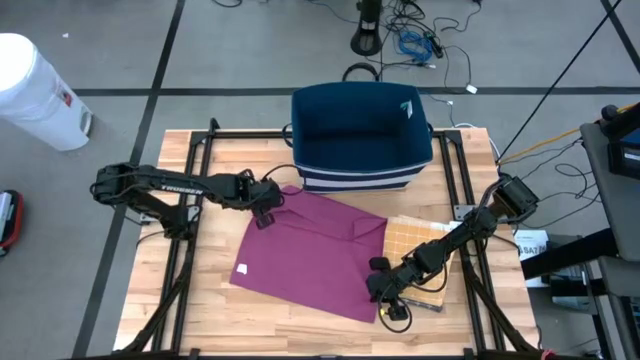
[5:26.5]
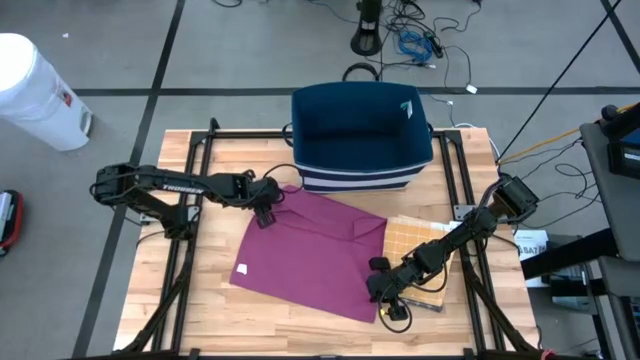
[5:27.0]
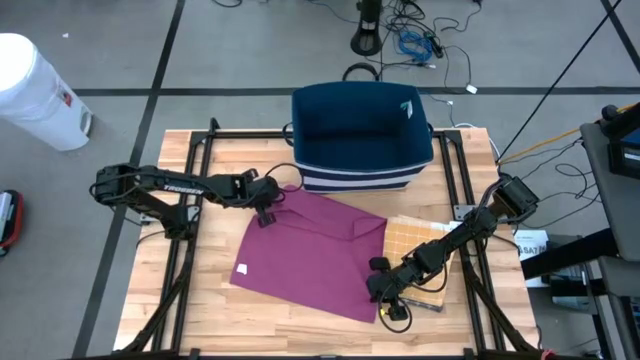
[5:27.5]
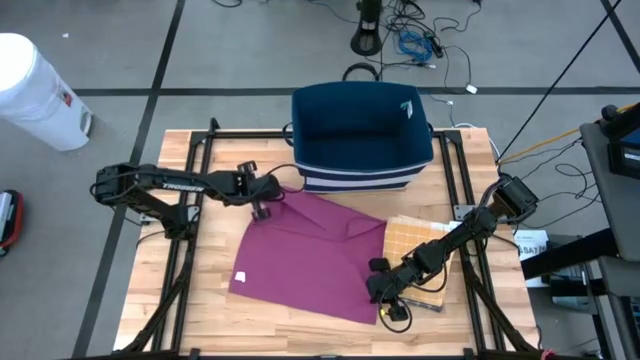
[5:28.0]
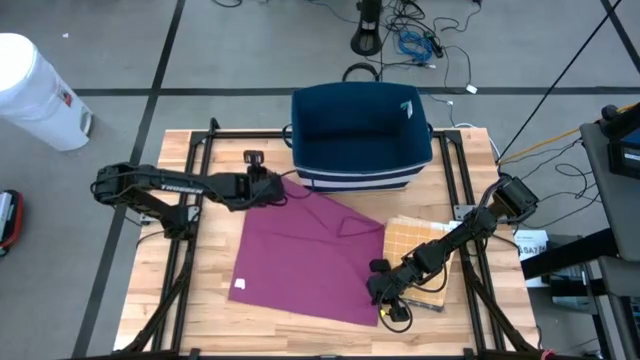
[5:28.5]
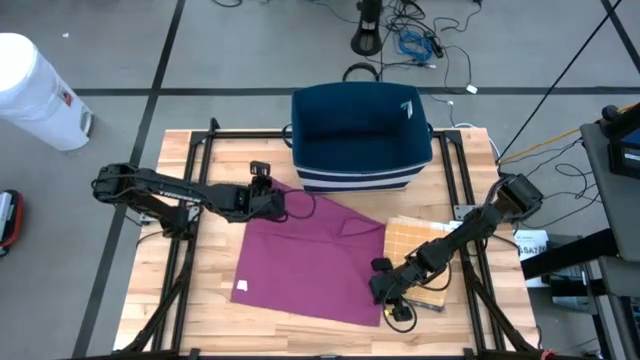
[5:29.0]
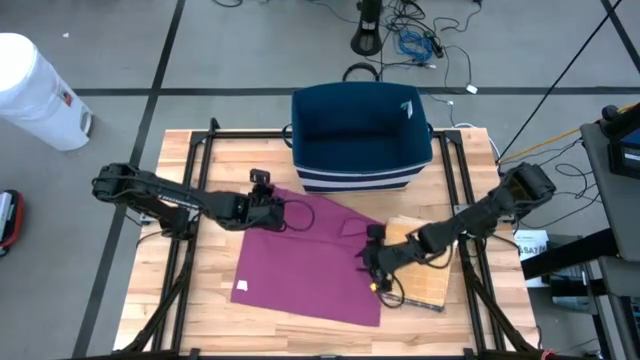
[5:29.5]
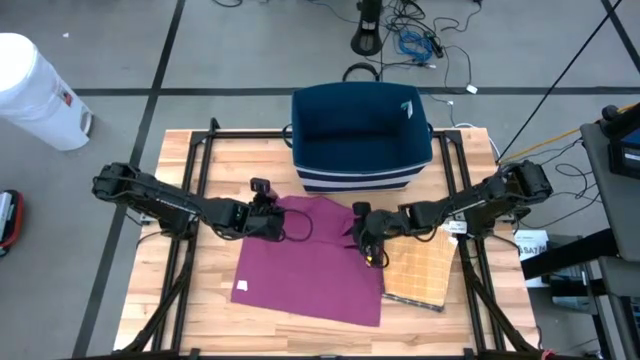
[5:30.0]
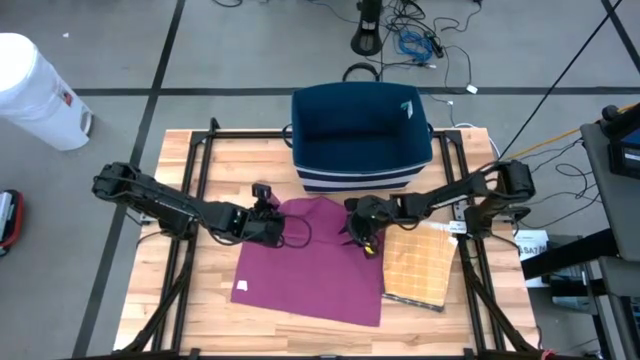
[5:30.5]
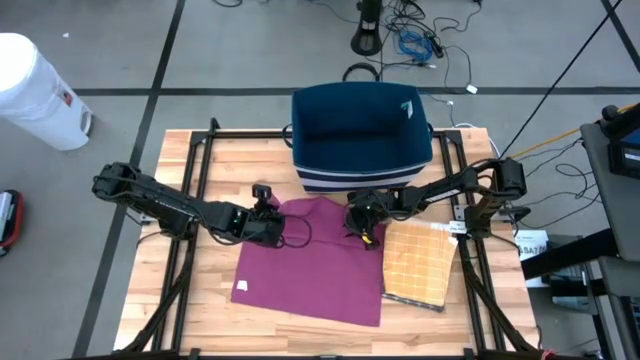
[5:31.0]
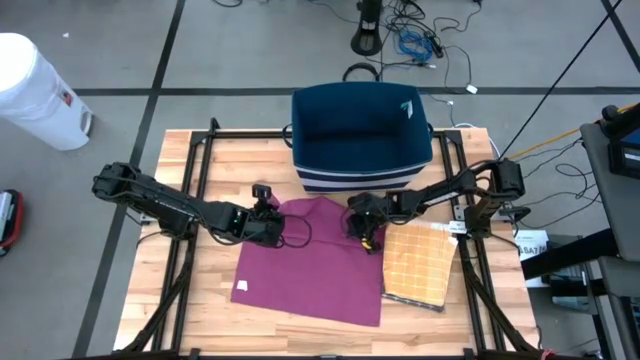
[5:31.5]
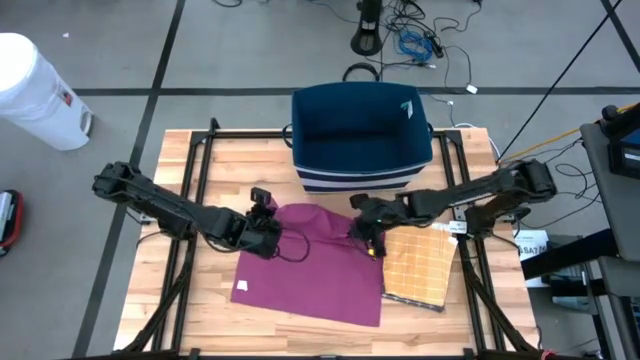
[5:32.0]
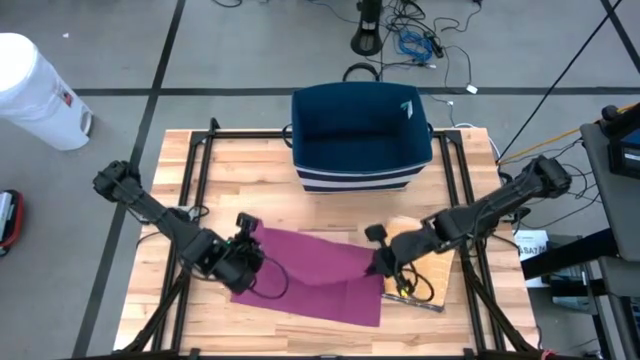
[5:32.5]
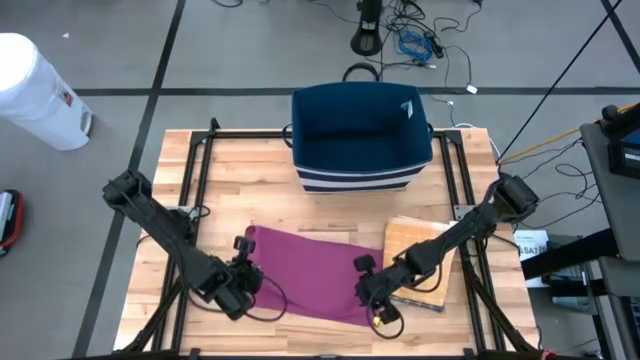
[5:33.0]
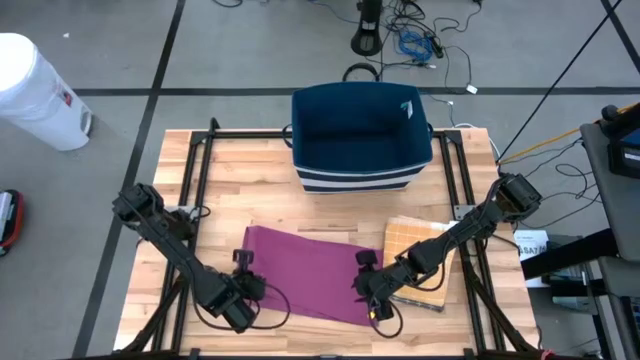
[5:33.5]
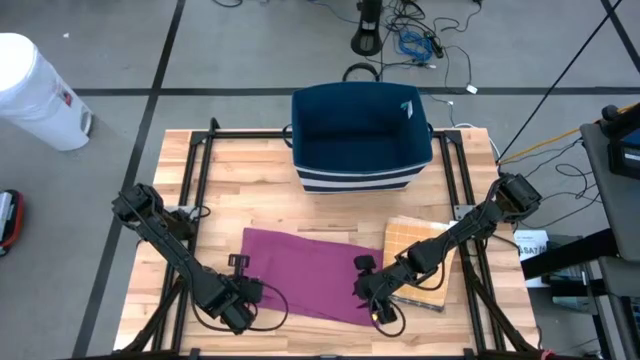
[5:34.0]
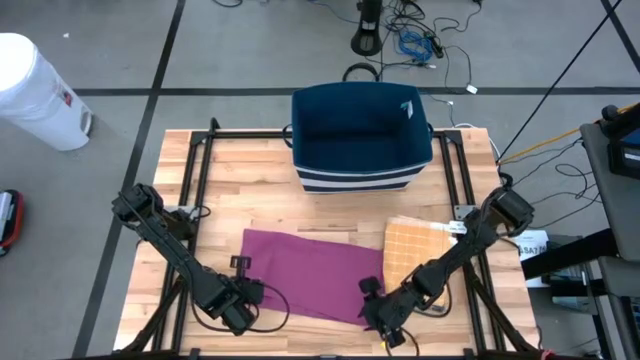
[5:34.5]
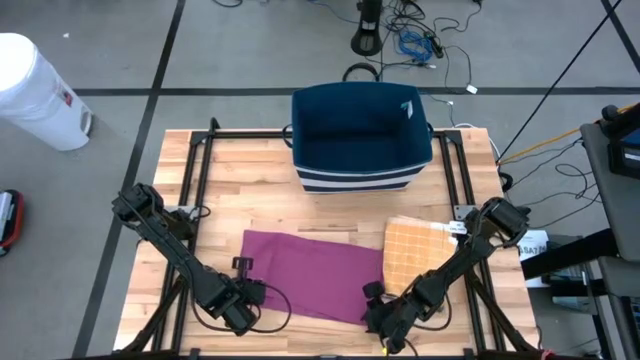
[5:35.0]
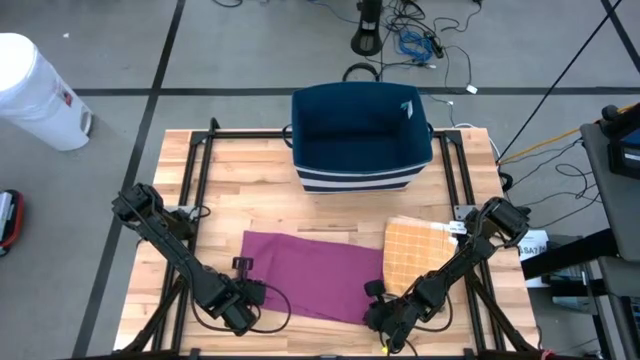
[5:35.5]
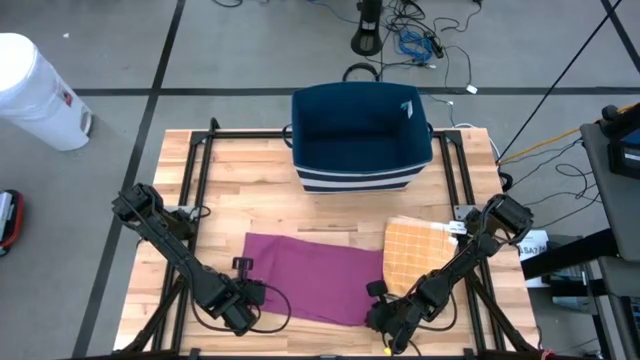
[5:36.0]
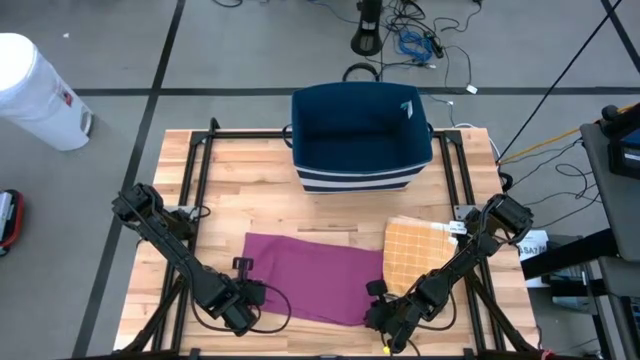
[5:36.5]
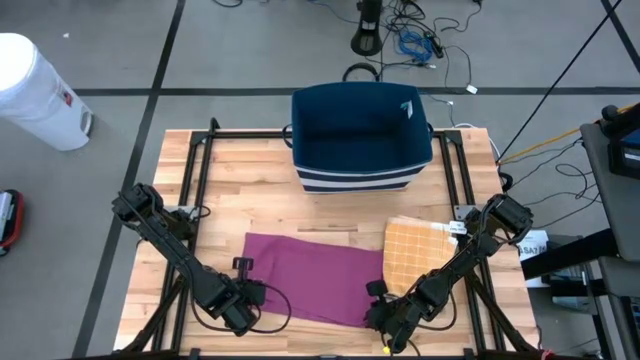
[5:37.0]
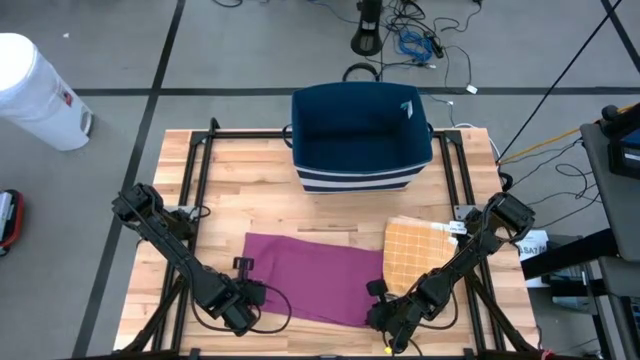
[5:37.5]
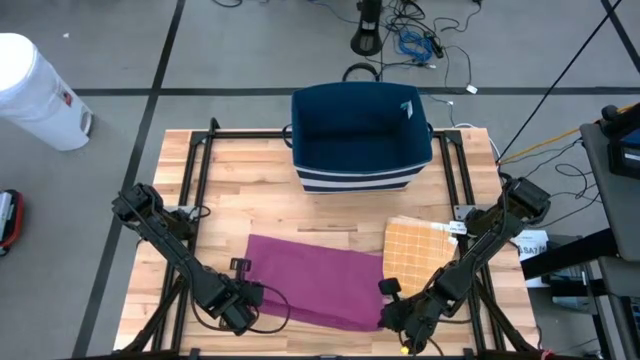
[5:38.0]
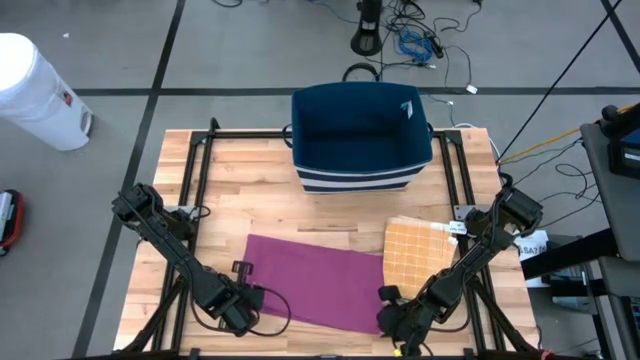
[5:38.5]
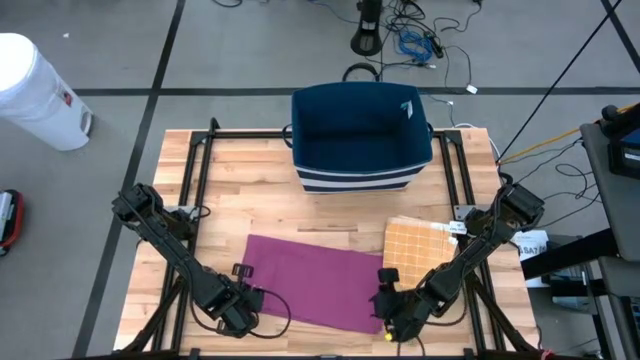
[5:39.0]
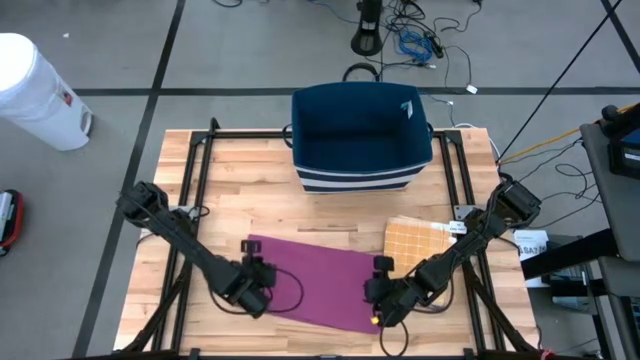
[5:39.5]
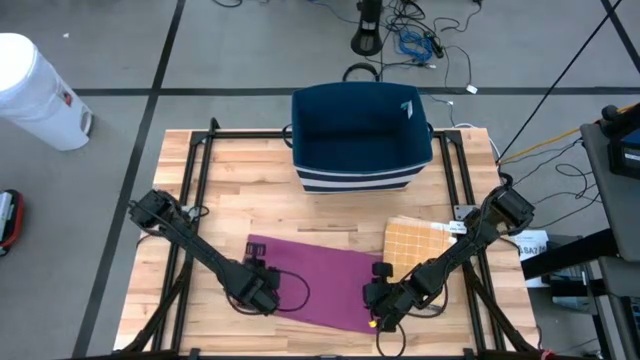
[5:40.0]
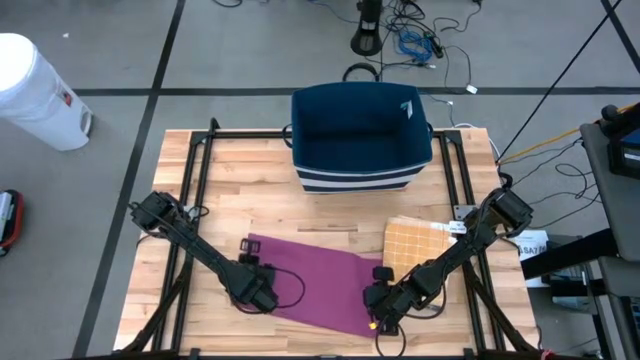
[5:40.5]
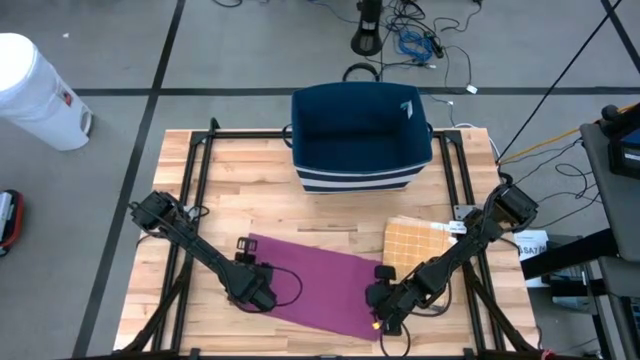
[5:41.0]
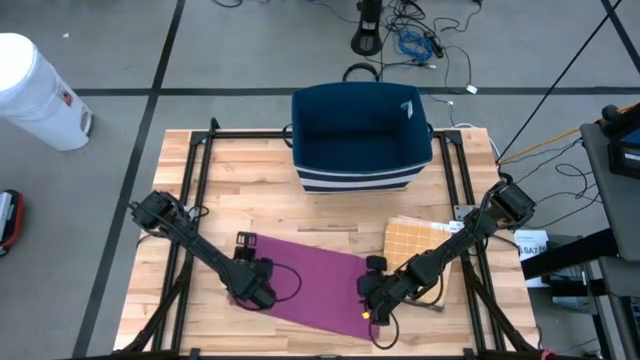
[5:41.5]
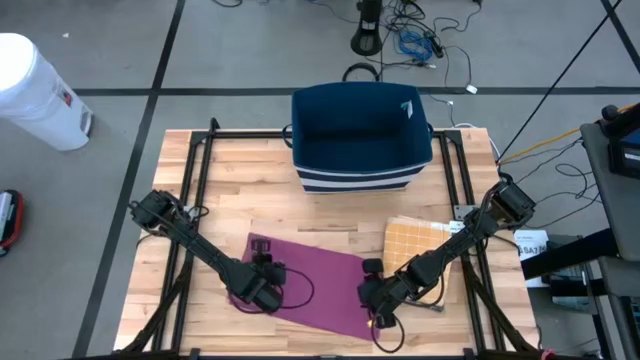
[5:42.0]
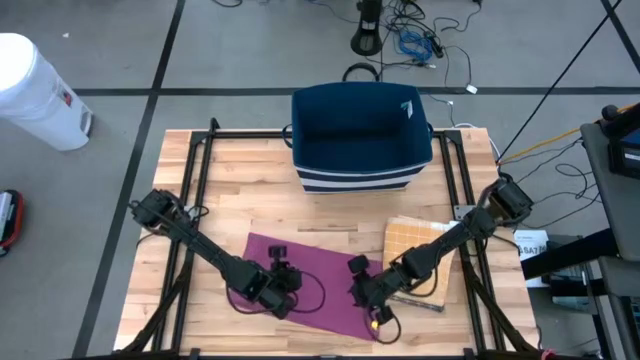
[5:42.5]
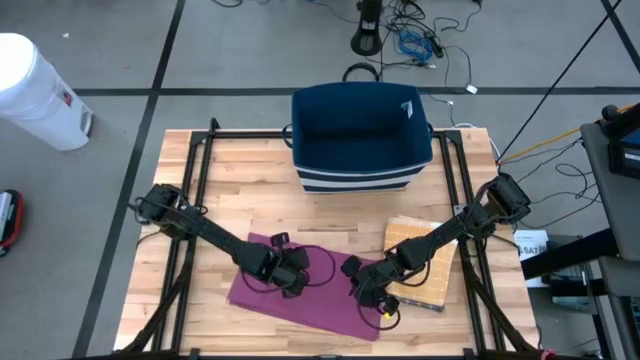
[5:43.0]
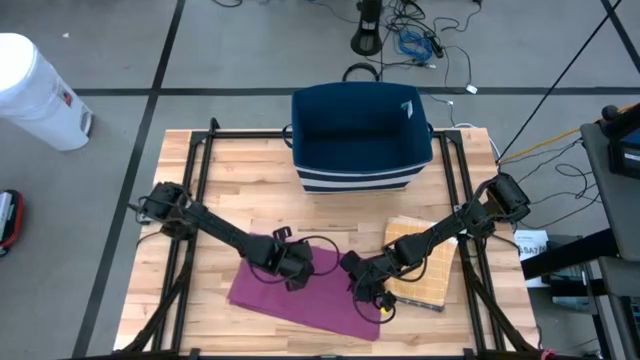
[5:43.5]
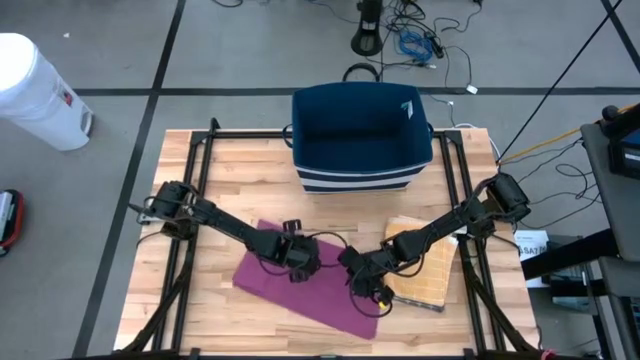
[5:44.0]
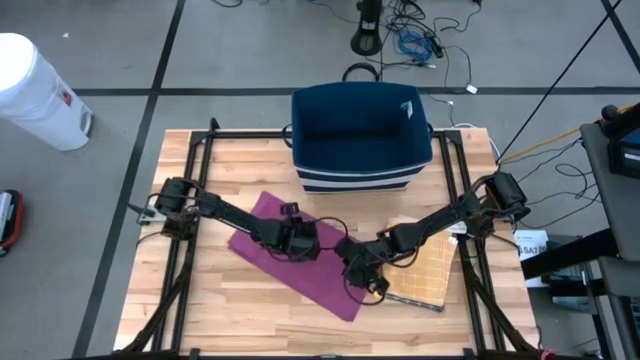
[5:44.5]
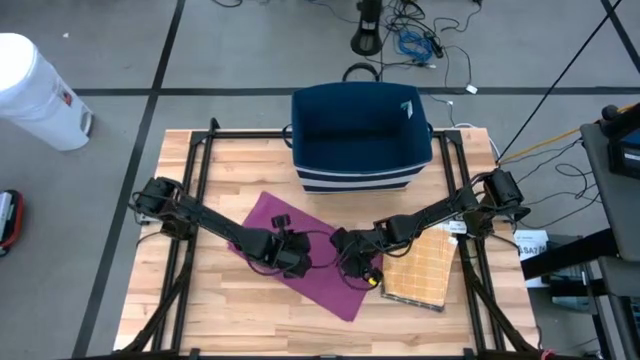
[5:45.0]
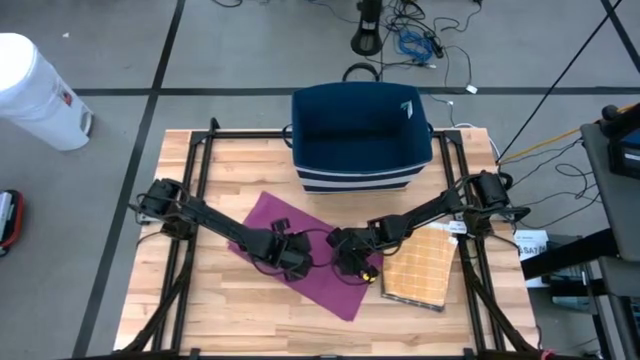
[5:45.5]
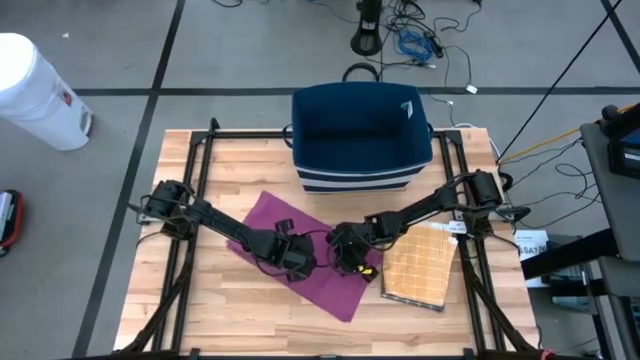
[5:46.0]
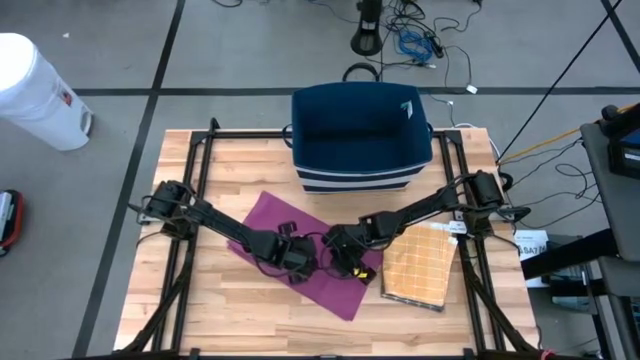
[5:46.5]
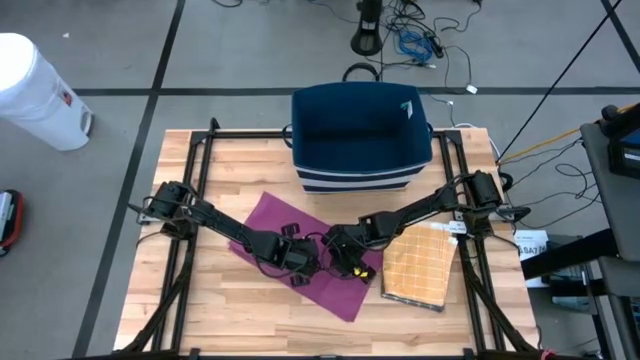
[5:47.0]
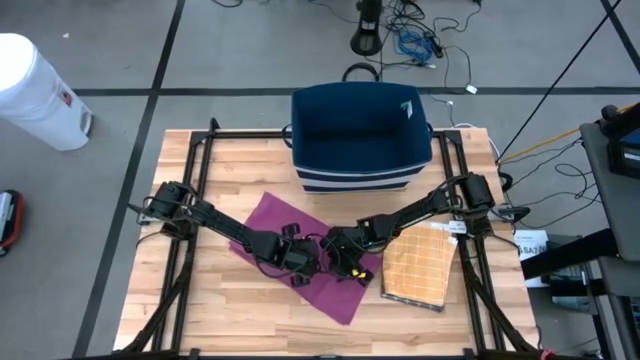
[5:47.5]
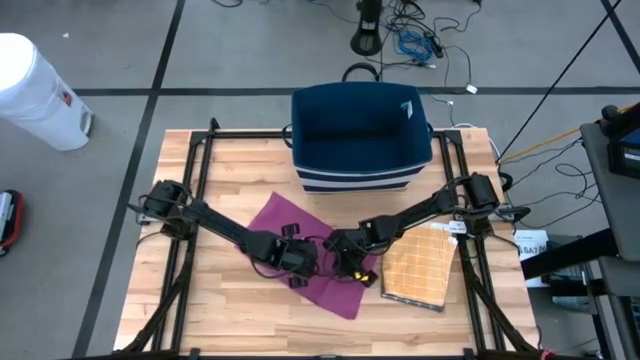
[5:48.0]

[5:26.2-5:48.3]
Task: Fold towel
Fold the purple towel
